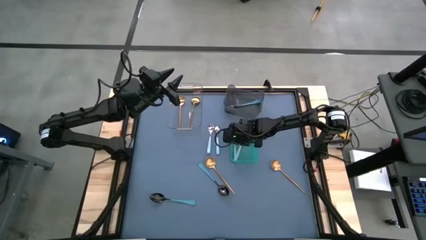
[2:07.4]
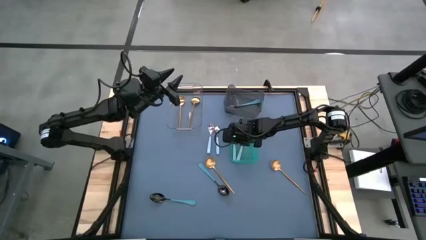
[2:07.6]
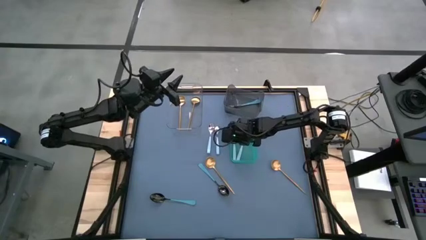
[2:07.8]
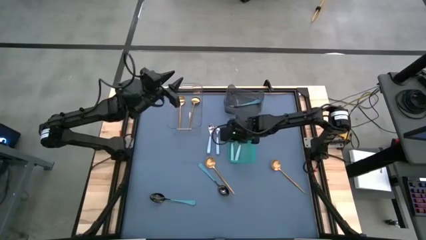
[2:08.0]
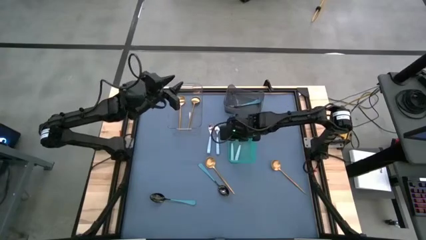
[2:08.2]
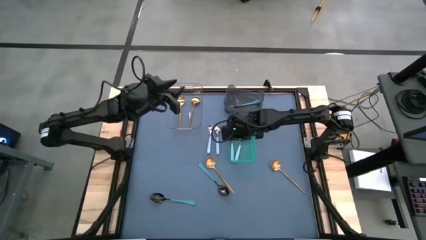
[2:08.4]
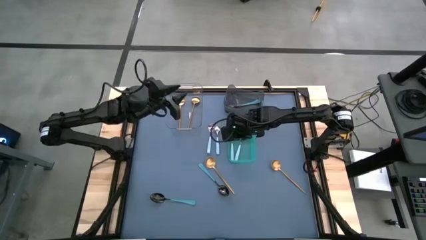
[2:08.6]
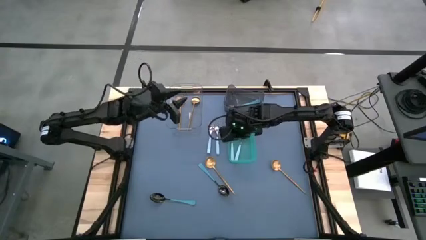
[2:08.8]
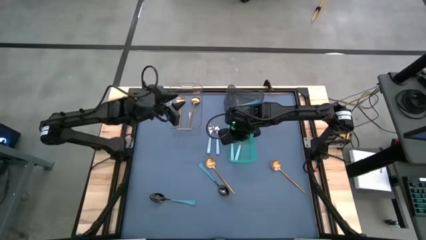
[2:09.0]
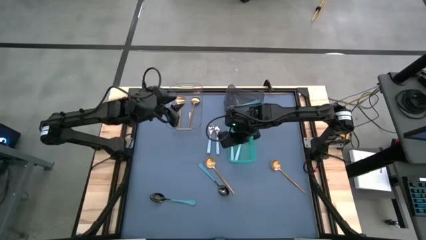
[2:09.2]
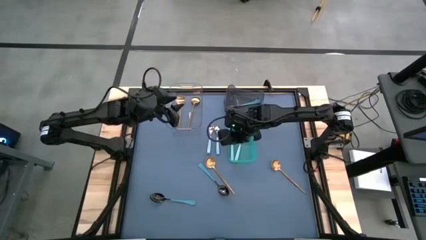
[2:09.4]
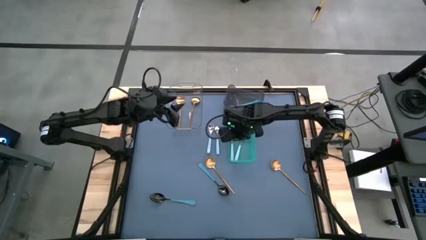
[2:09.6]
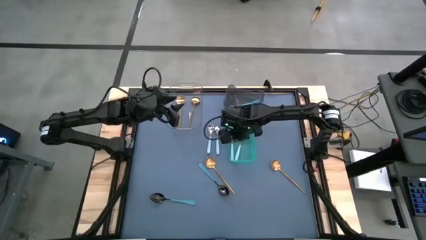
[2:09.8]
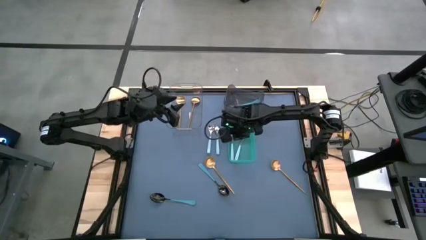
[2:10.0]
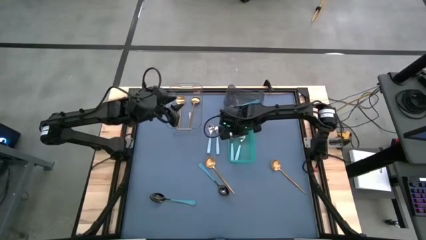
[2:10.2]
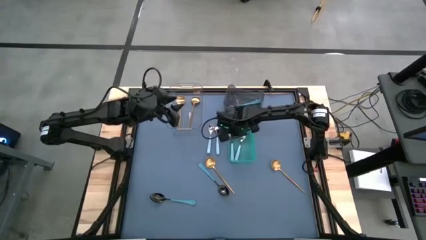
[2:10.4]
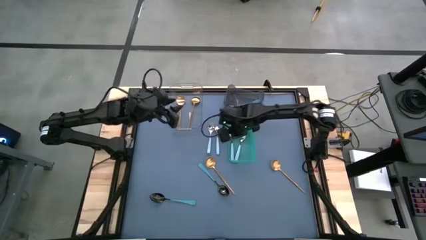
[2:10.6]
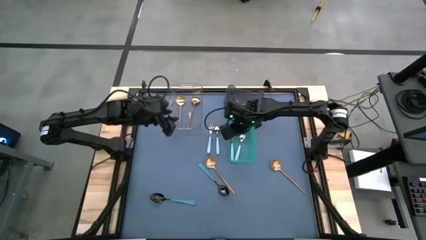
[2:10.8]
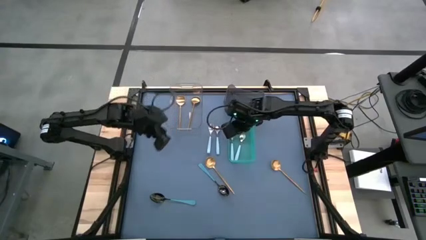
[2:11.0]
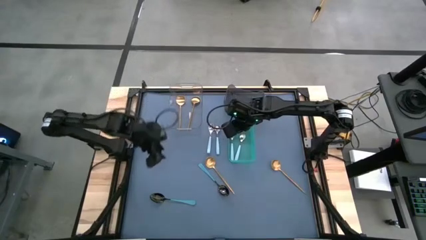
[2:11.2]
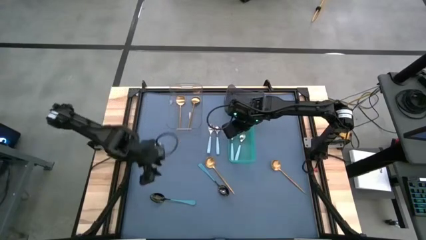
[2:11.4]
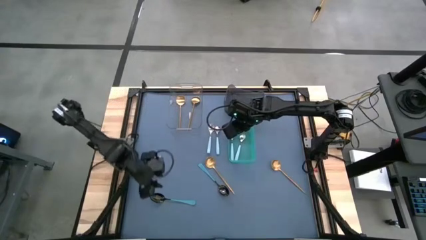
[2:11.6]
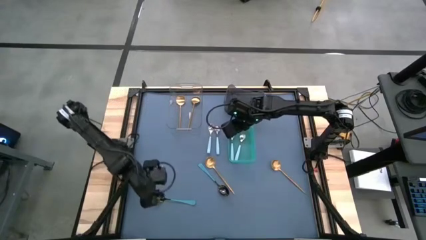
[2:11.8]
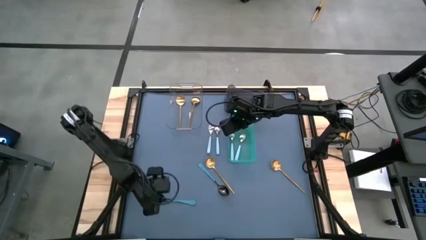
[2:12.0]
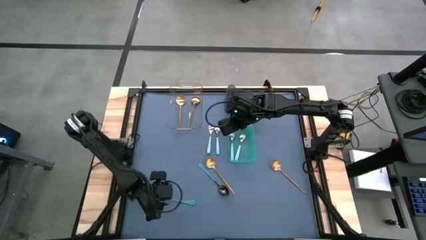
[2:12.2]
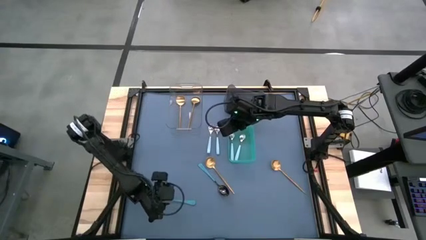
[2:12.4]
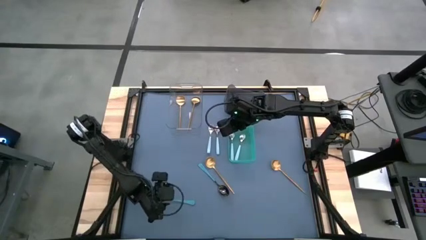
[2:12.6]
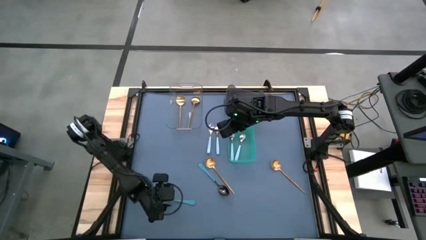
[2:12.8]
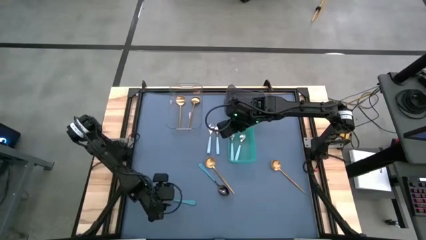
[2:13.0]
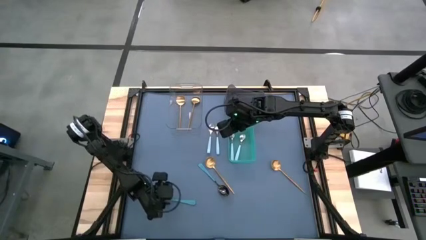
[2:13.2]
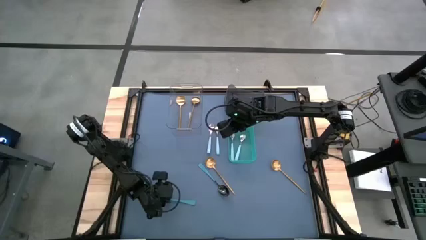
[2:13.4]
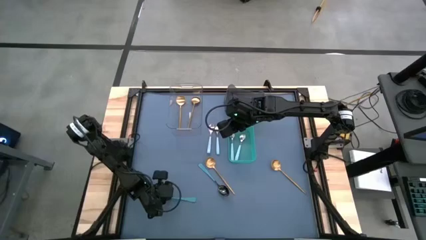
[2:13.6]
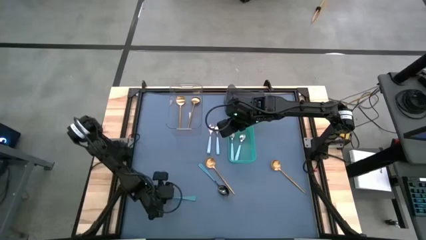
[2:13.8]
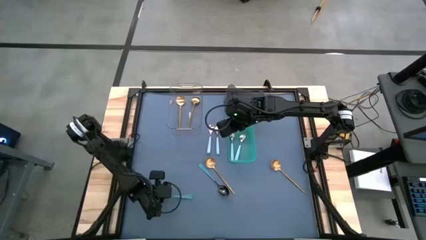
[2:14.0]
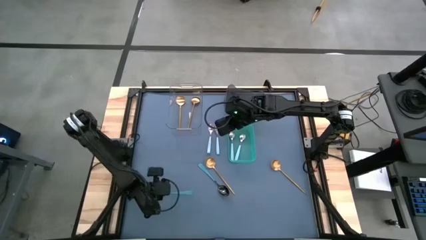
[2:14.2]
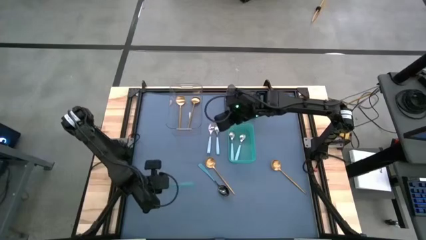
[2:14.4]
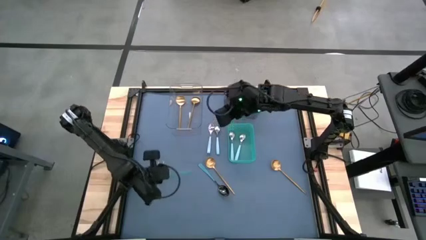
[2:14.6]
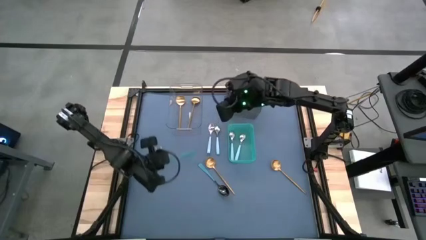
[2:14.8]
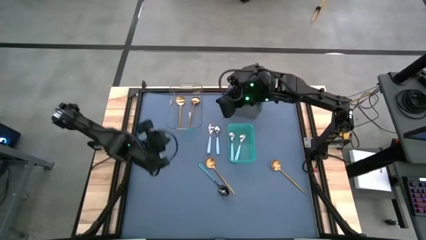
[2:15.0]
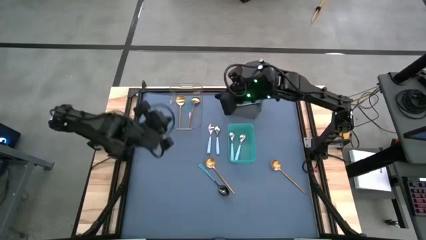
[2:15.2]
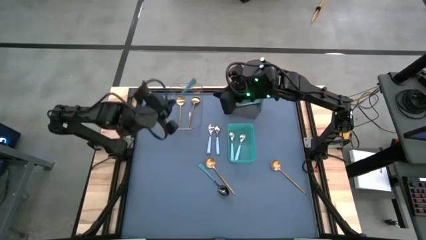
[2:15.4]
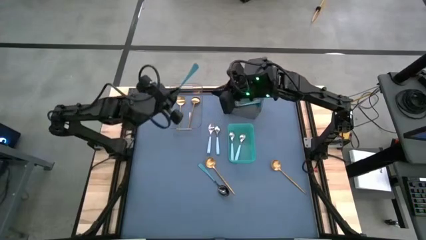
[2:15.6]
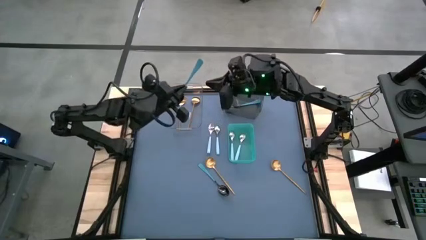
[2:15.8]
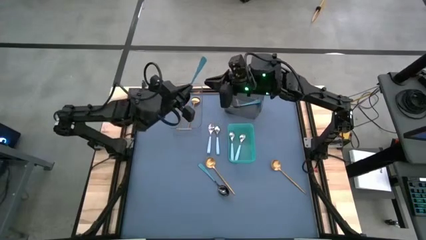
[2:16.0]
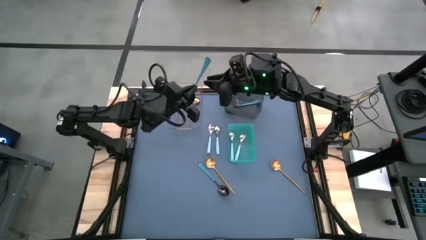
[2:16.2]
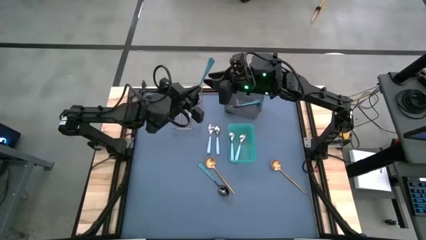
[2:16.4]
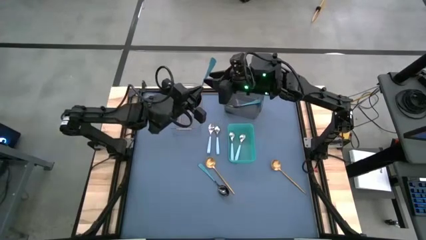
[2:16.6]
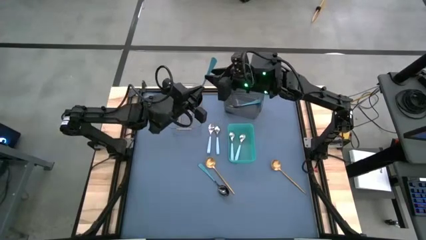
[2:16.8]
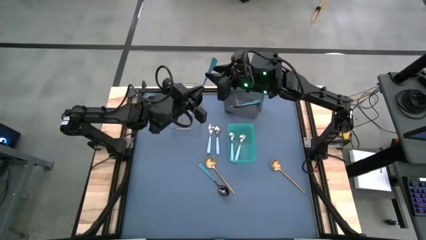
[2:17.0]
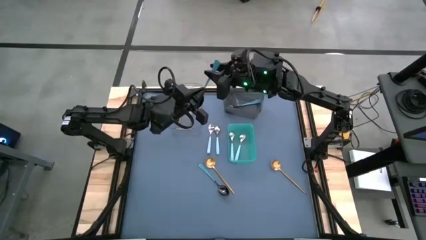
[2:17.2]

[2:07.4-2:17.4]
Task: Sort silverware by color (type)
Put the blue spoon into the black bin
